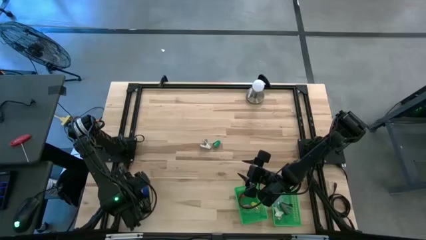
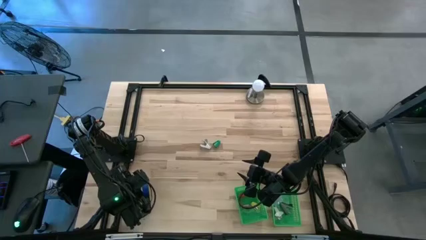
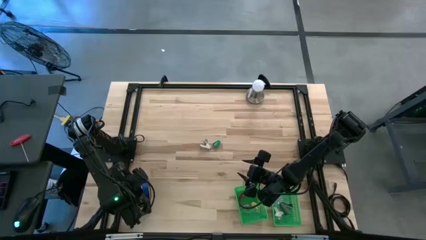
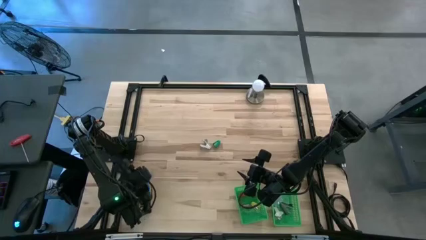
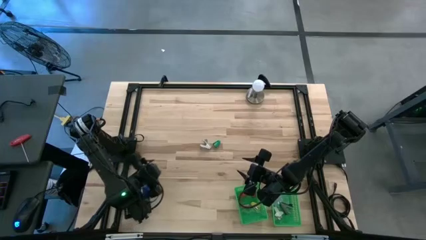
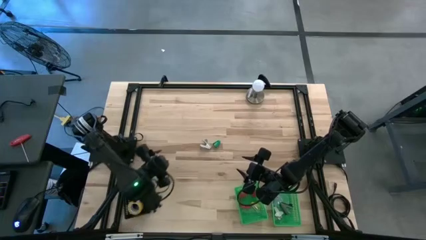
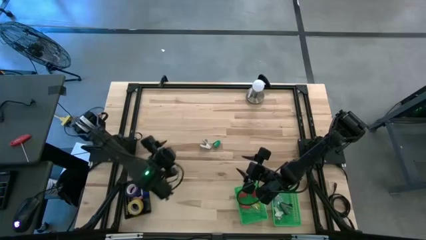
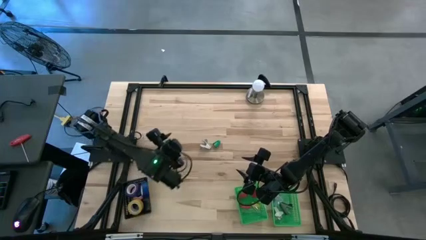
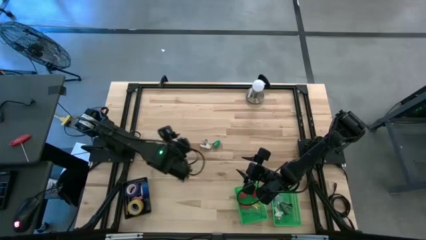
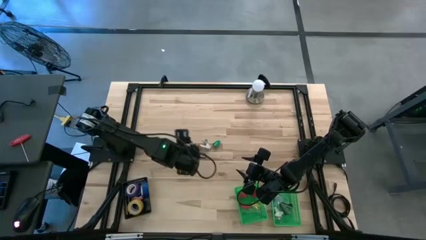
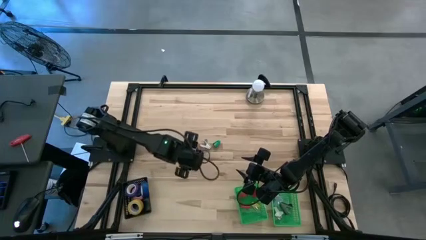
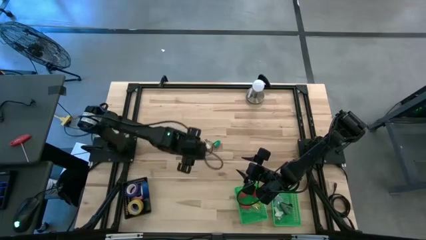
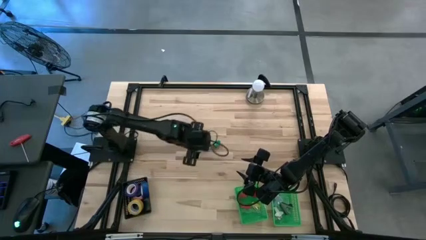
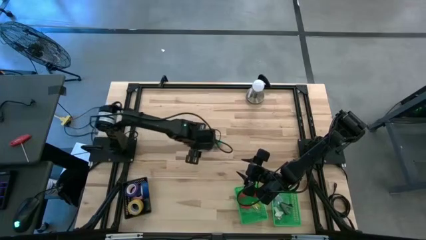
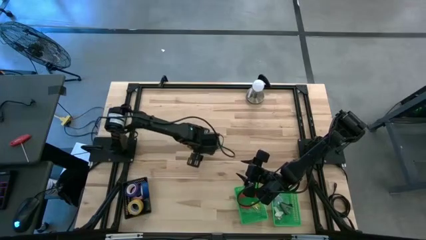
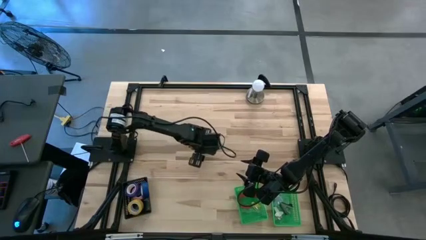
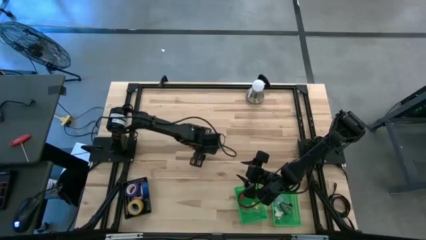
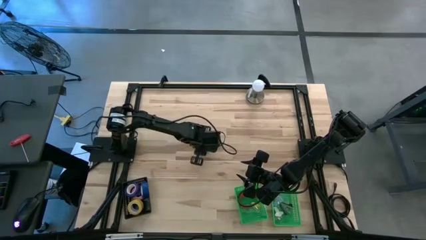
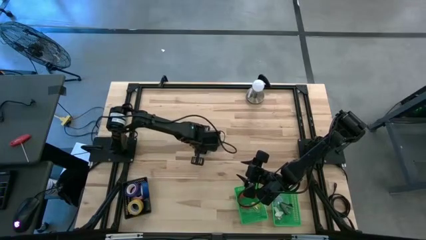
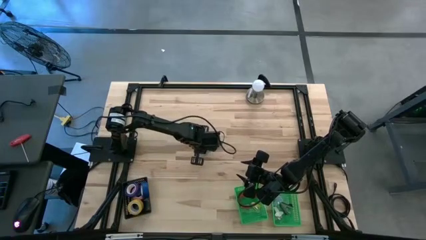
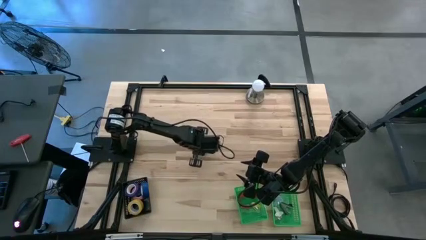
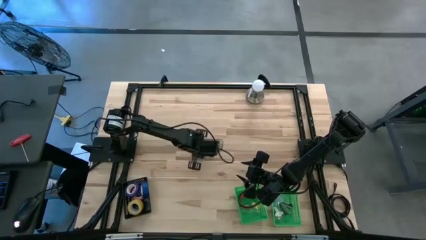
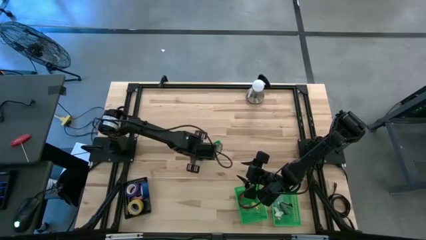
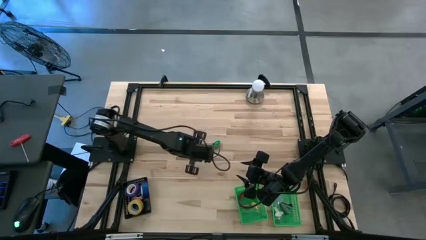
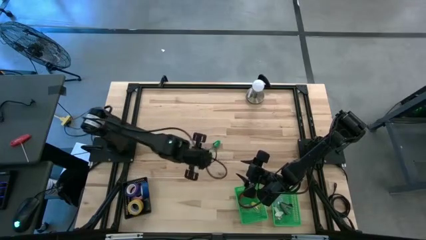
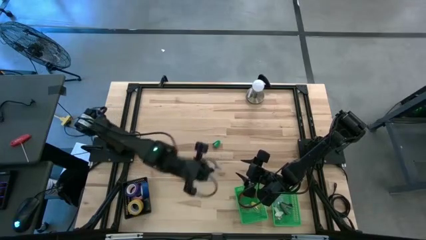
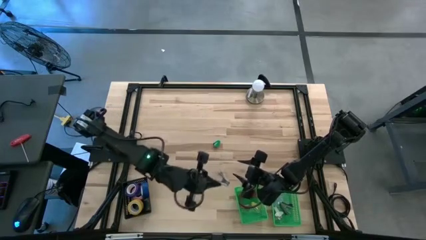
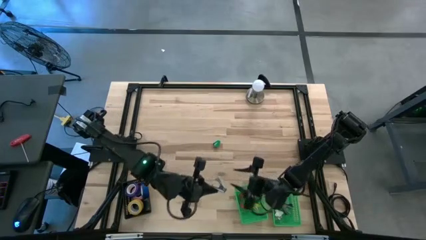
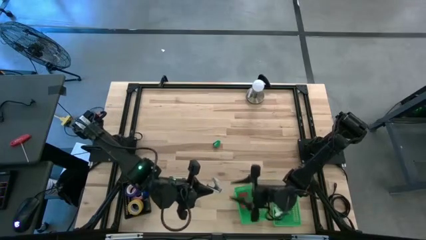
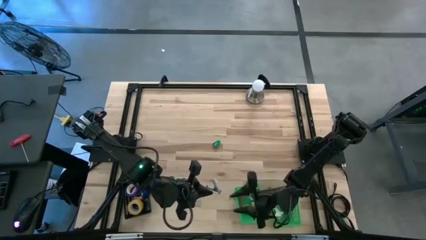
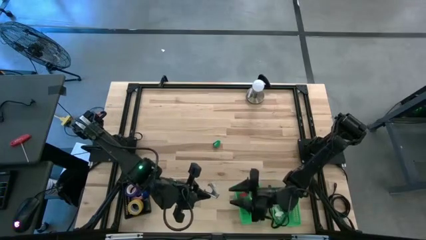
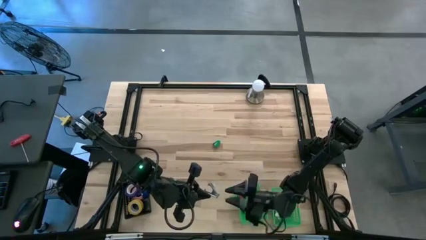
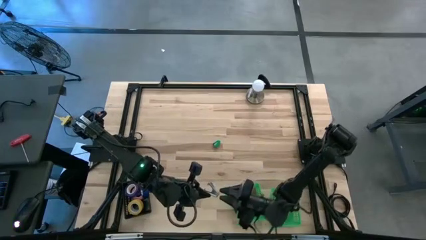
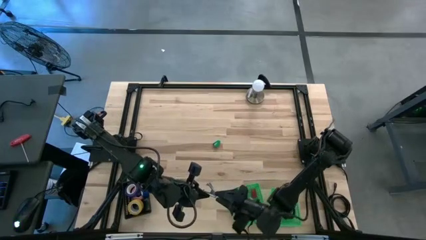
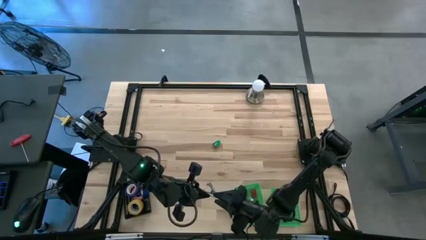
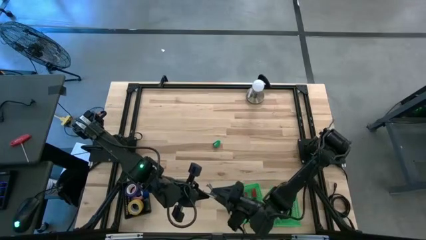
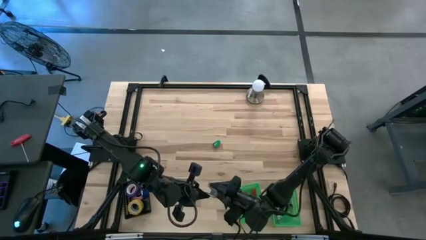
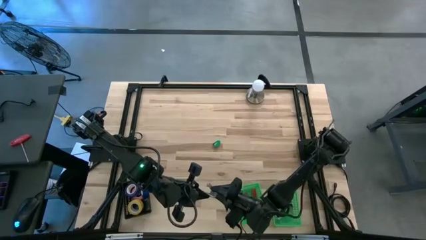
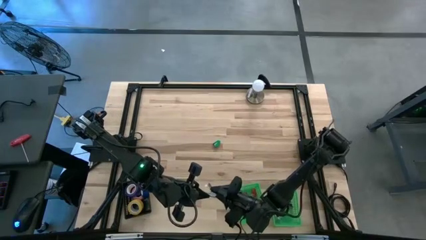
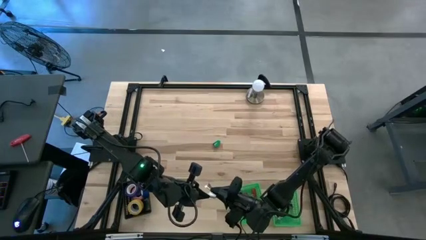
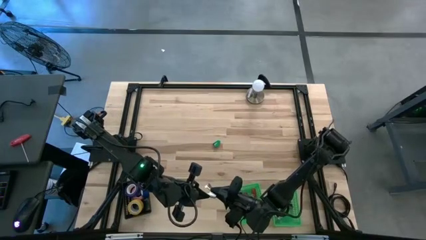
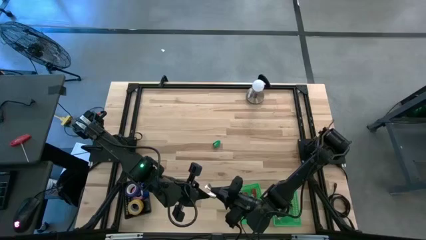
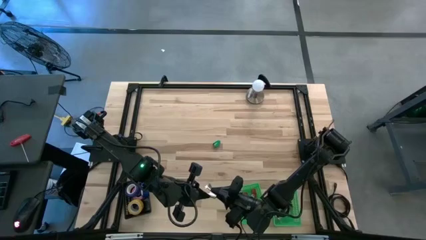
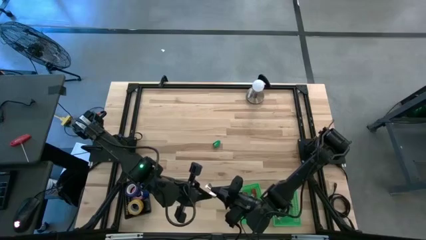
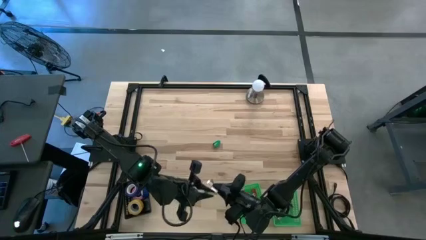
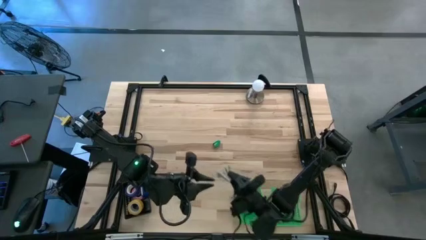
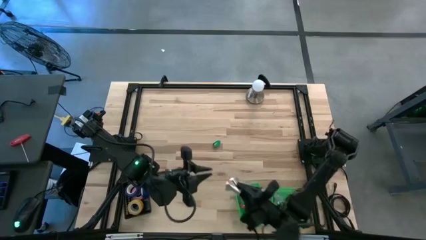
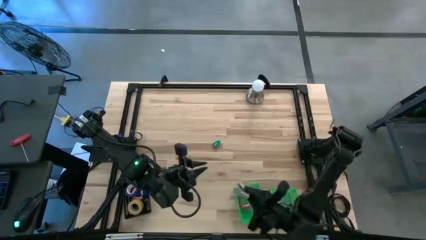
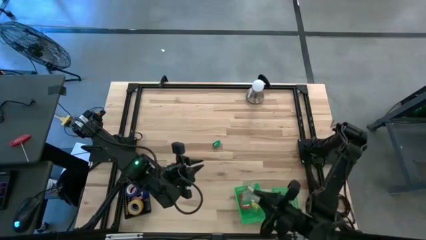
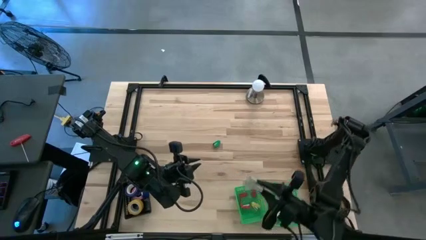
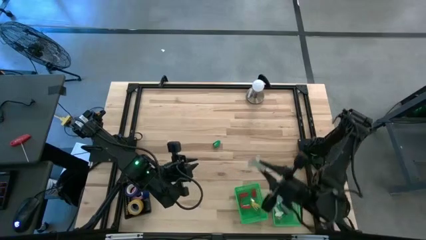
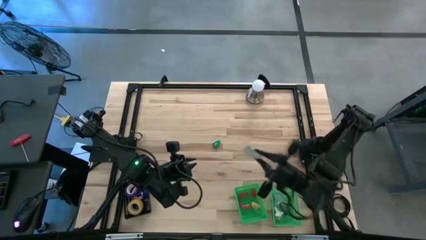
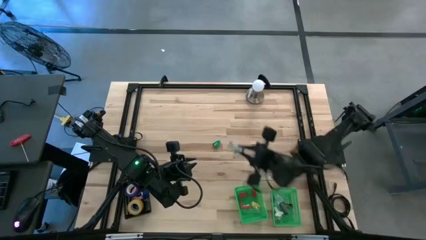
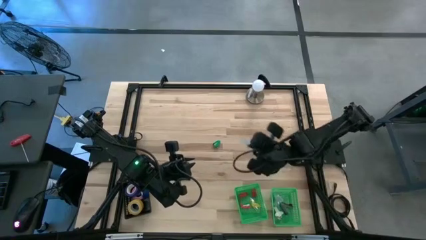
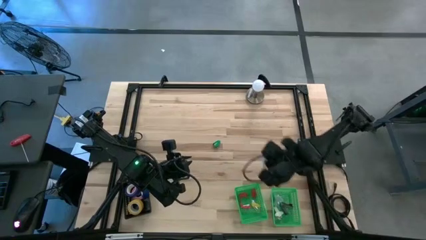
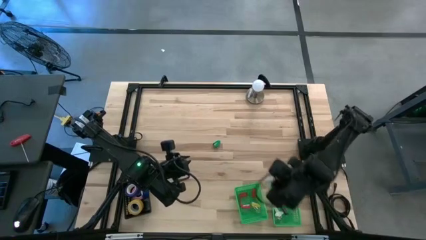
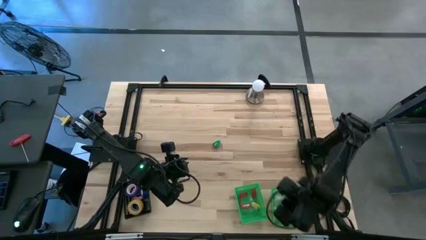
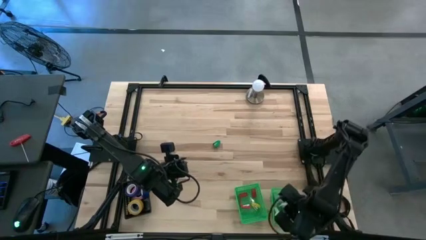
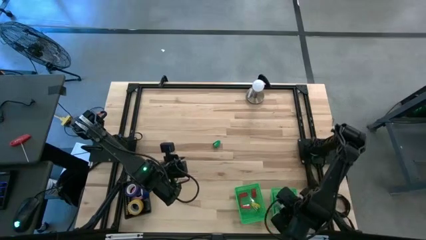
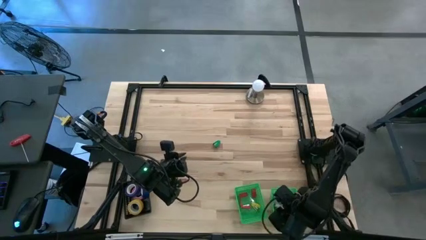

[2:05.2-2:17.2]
Task: Pick and place Stapler, Stapler remover, tape
Put the gray staple remover into the right green bin

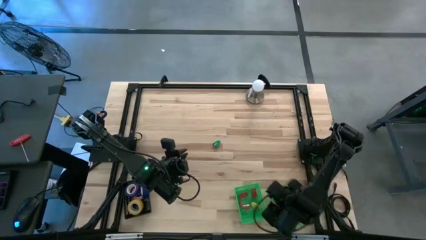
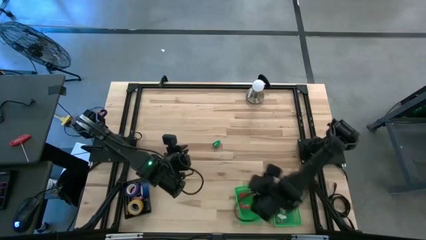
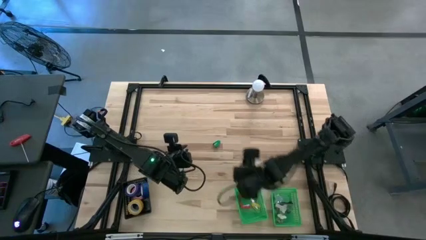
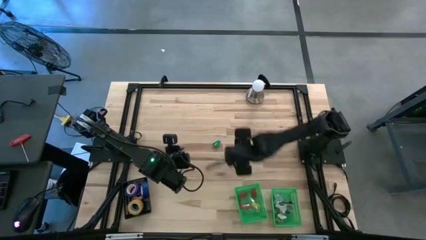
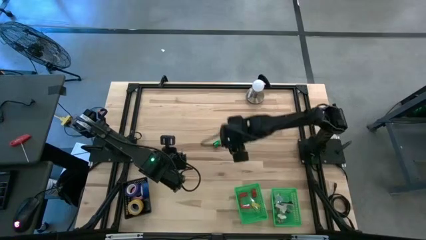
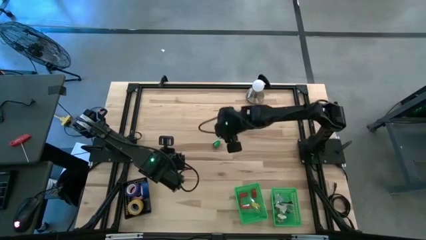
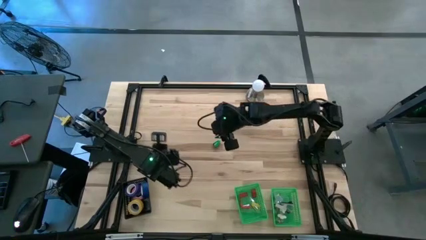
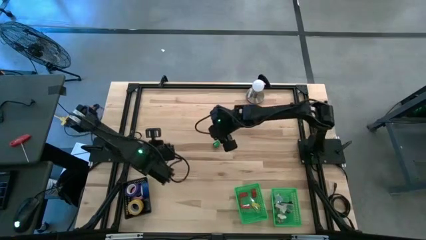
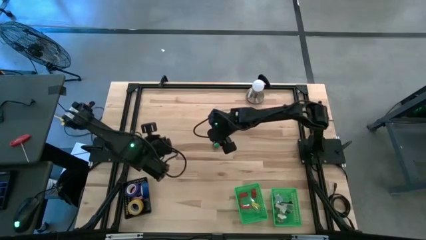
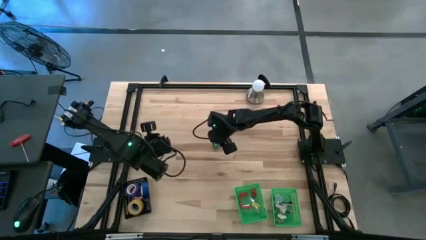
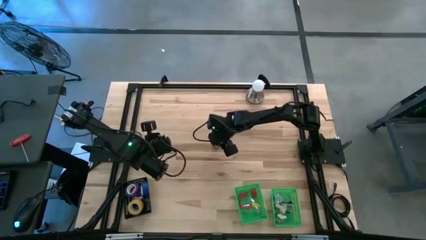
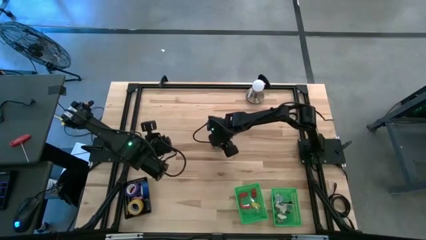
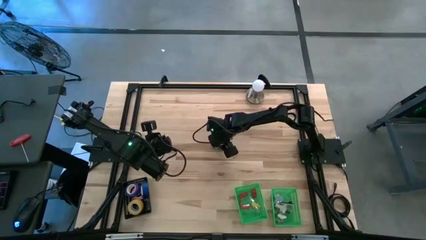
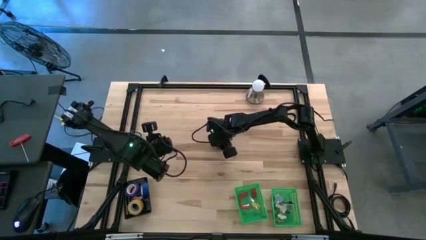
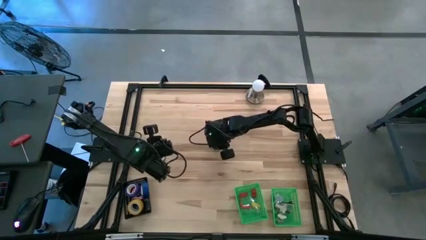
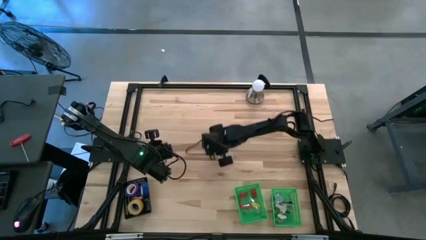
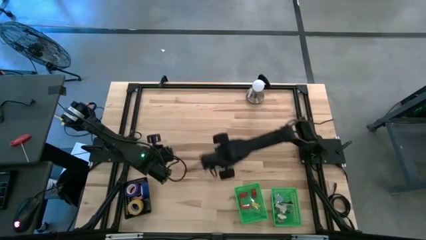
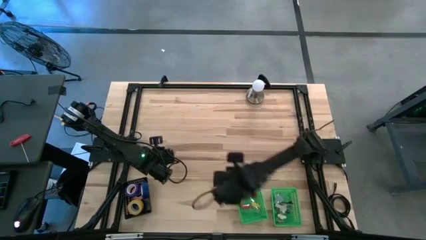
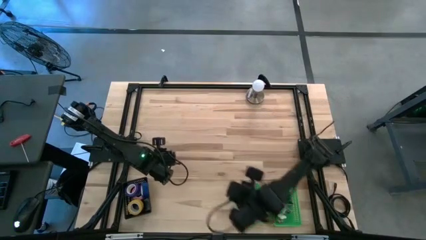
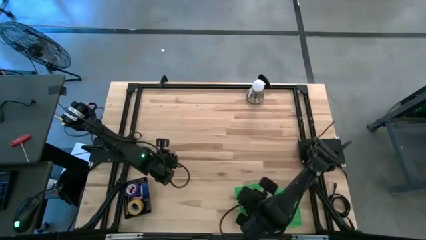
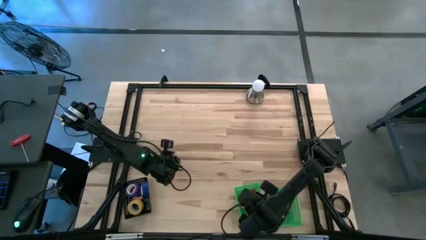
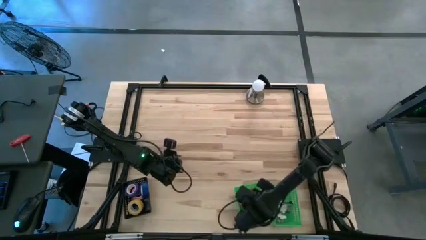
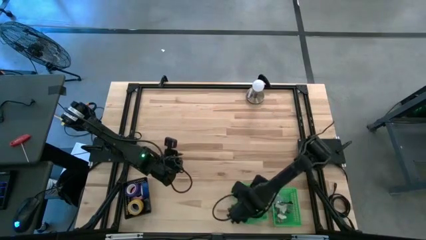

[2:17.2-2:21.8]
Put the green stapler into the left green bin
